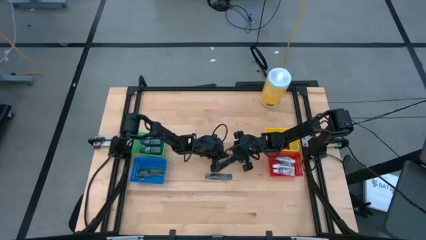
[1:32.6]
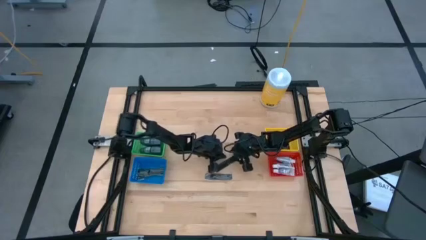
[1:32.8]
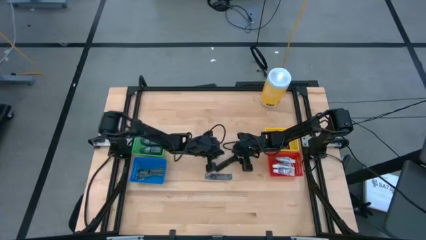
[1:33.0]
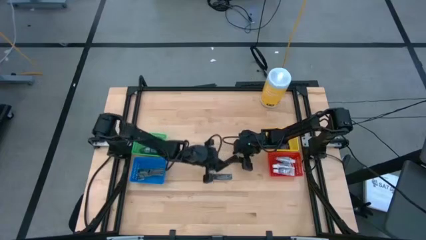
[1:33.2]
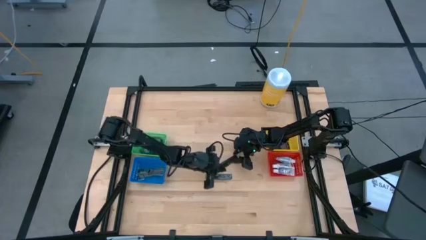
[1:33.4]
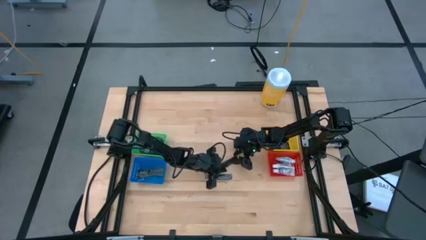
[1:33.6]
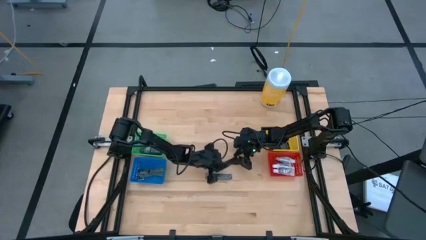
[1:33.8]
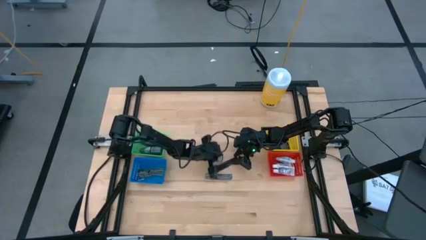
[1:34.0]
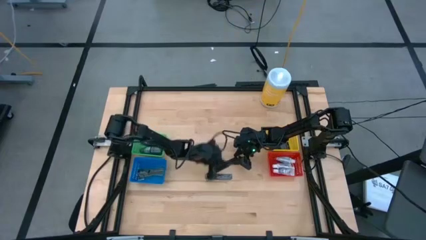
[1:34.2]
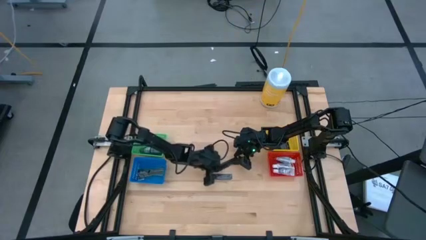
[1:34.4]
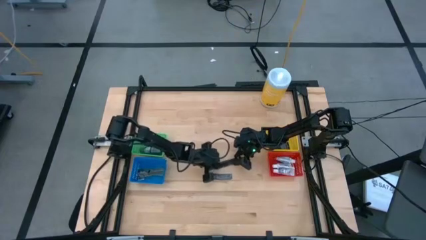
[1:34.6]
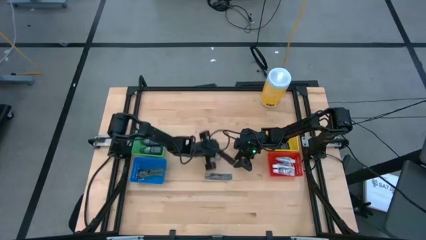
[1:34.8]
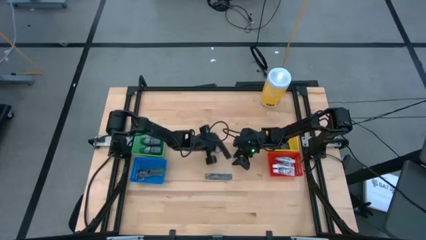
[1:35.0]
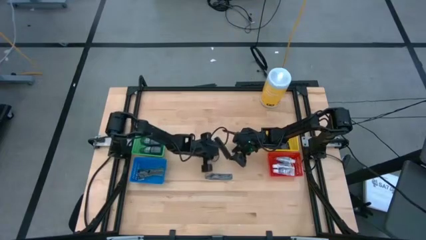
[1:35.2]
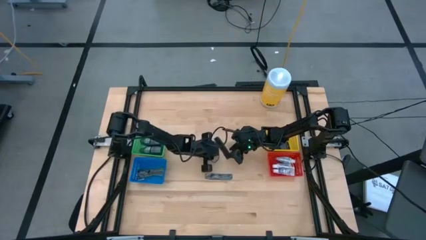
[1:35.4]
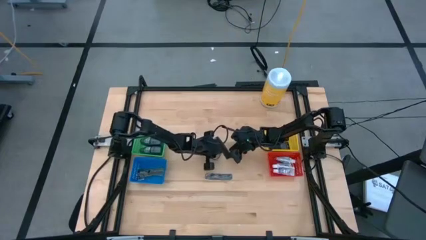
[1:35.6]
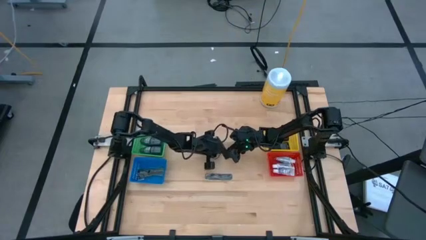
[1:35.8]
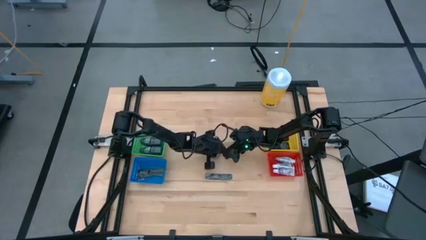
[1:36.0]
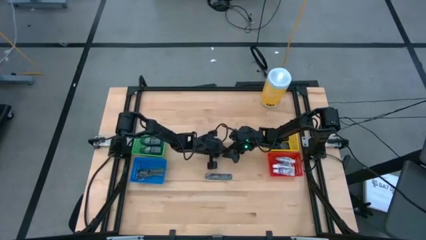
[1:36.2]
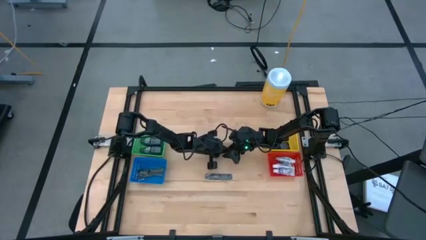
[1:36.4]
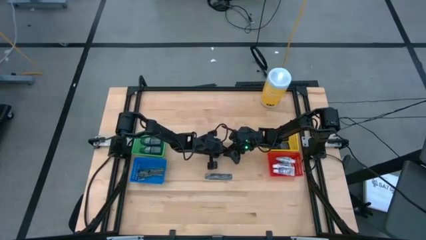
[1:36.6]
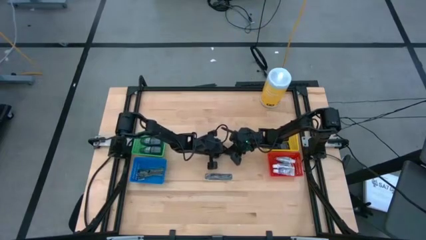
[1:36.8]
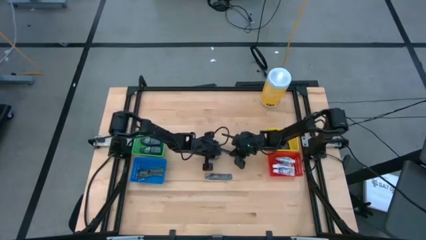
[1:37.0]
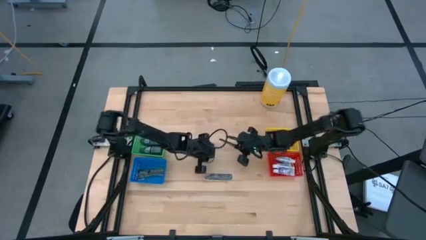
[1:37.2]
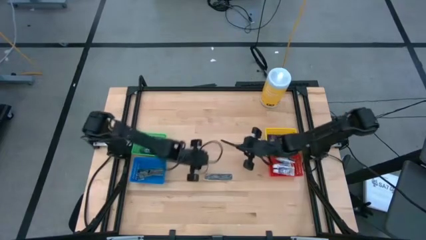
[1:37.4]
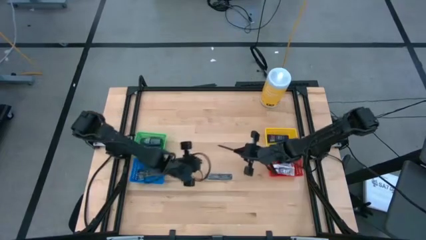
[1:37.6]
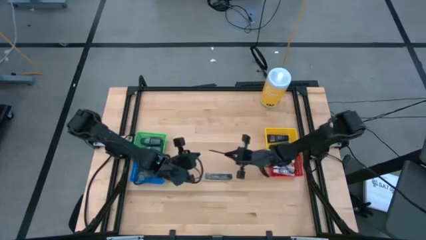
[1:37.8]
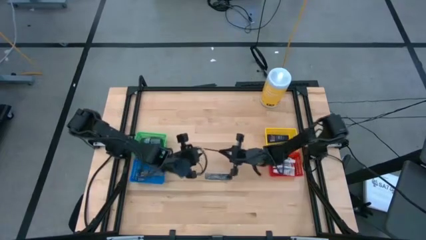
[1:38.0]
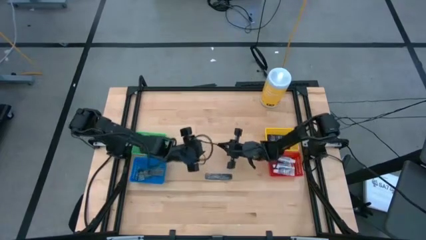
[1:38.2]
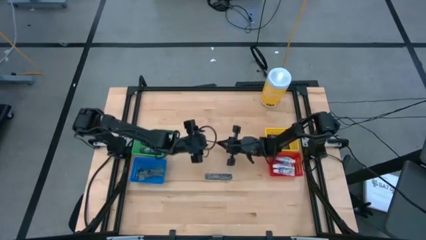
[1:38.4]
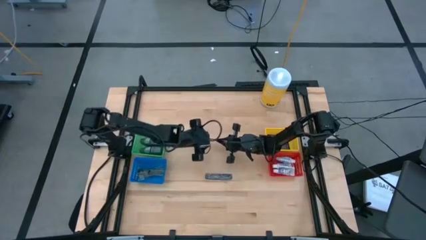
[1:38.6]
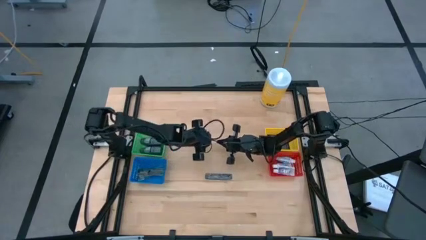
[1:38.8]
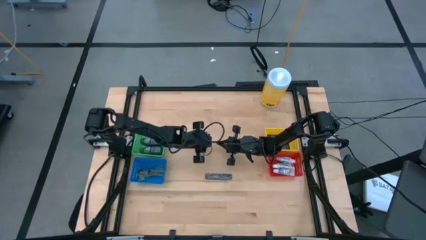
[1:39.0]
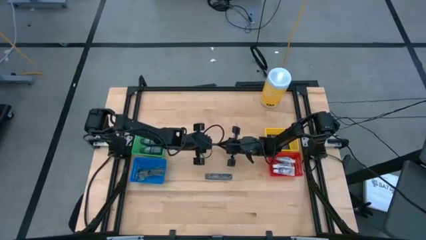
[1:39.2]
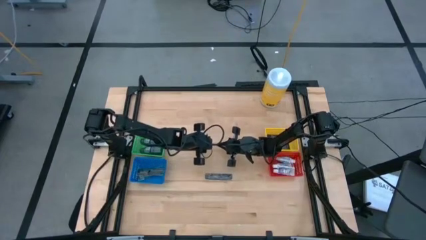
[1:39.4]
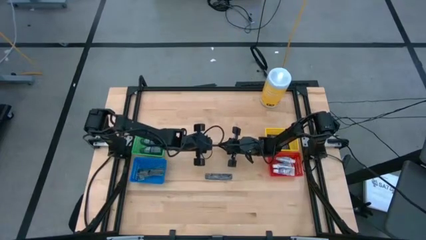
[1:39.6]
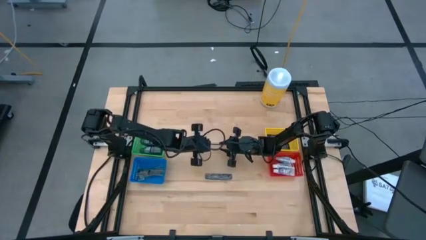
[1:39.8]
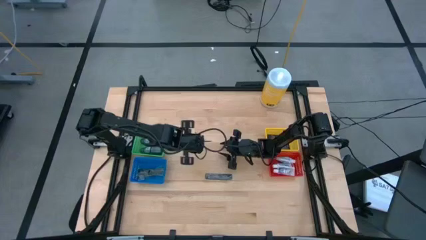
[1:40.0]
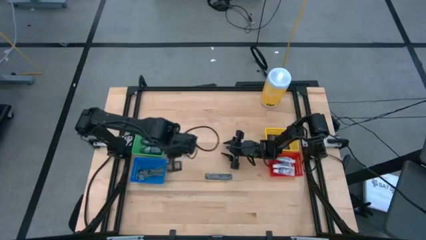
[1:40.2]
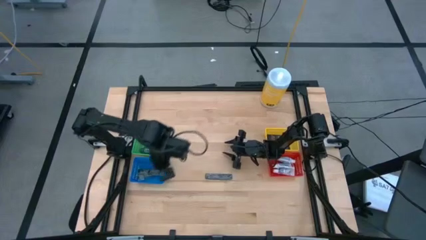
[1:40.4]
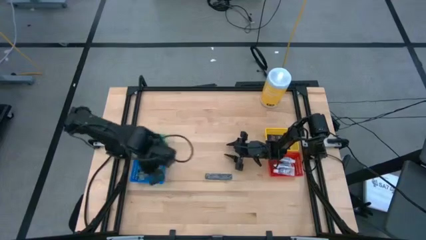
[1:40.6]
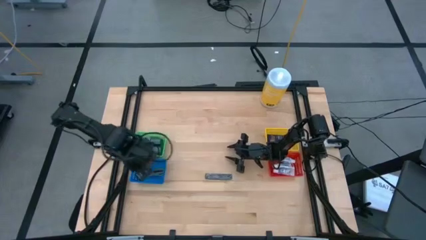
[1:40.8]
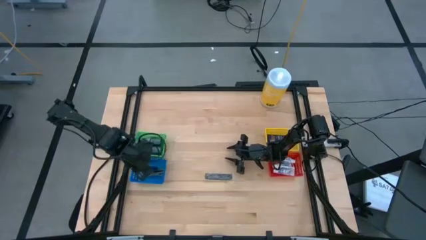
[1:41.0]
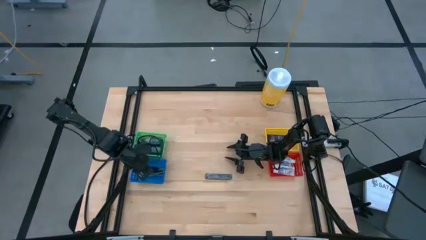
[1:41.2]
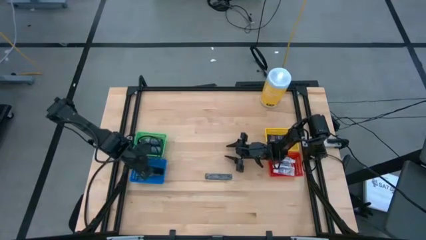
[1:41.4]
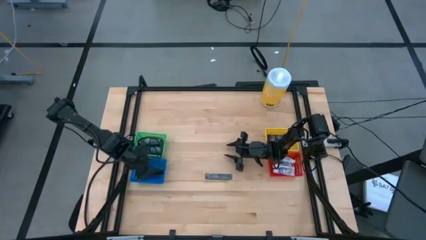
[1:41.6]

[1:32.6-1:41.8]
Task: Pick & Place Travel size toiletries
Put the black comb into the blue bin

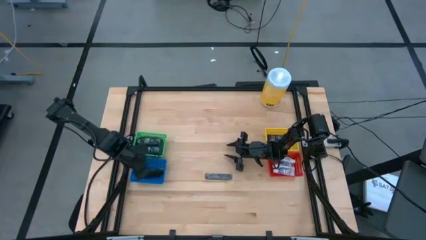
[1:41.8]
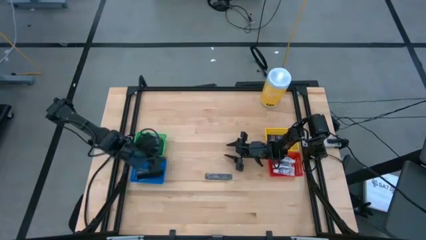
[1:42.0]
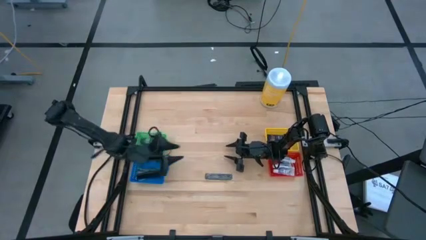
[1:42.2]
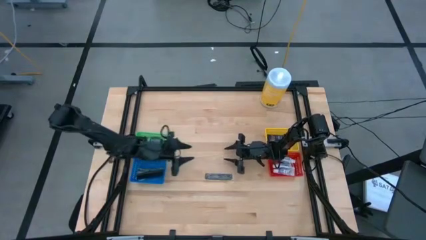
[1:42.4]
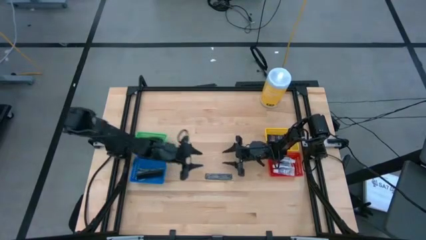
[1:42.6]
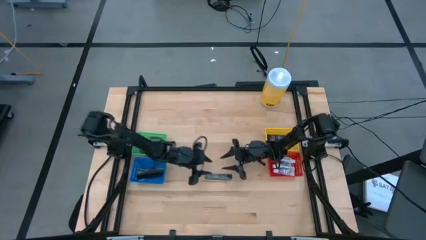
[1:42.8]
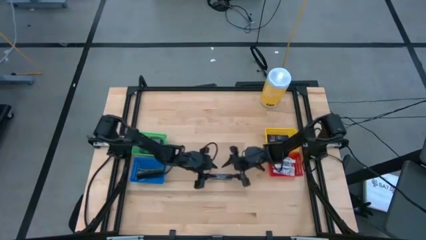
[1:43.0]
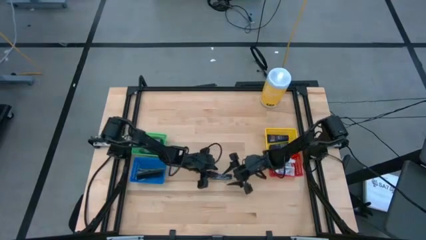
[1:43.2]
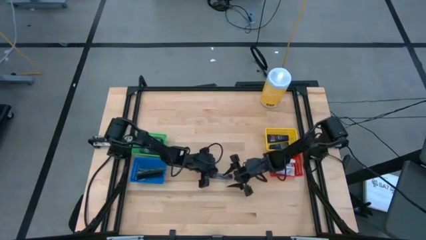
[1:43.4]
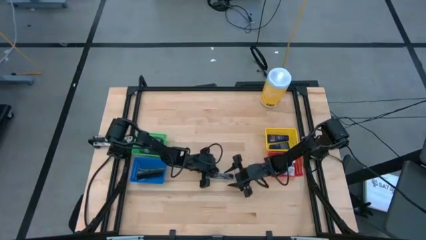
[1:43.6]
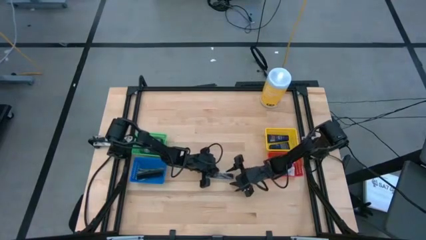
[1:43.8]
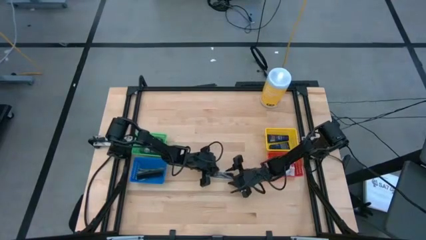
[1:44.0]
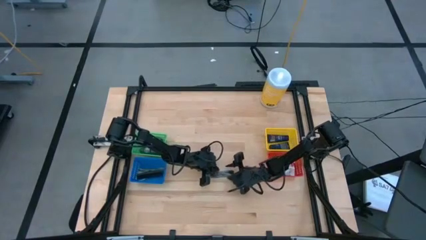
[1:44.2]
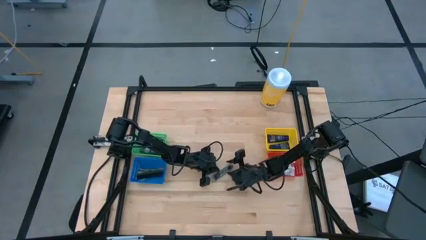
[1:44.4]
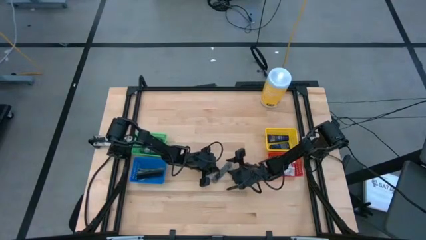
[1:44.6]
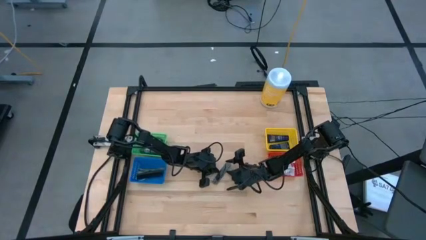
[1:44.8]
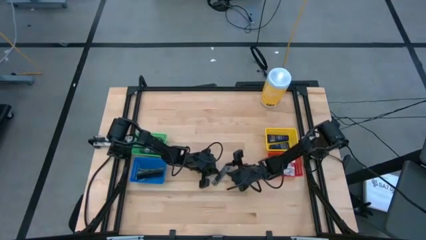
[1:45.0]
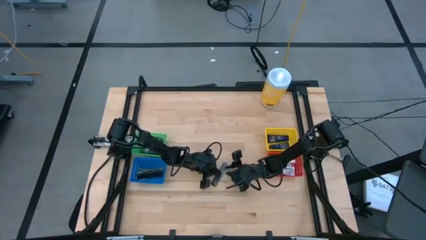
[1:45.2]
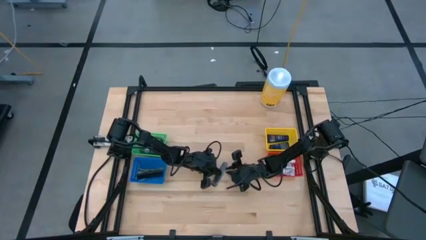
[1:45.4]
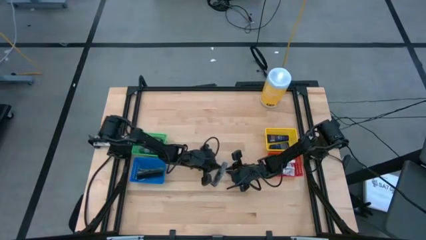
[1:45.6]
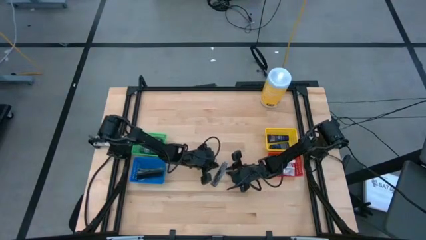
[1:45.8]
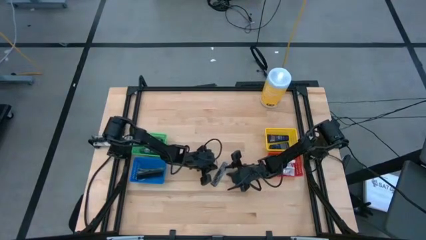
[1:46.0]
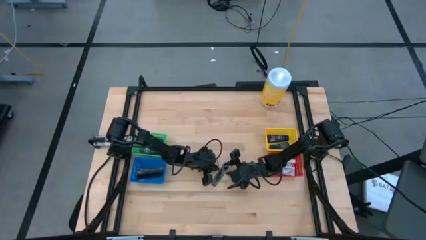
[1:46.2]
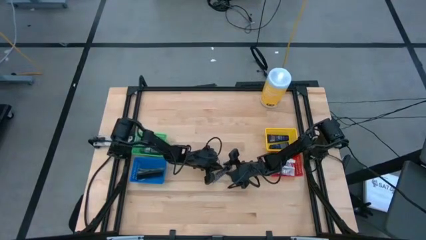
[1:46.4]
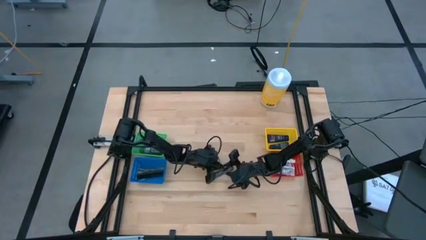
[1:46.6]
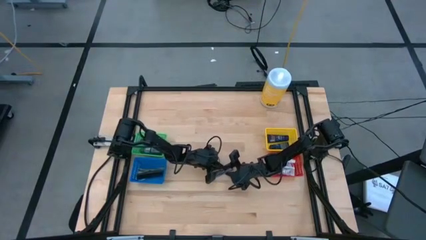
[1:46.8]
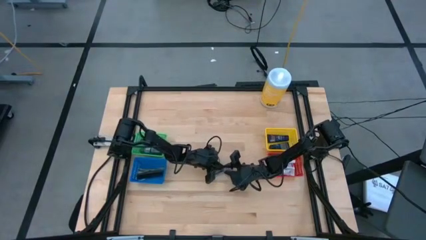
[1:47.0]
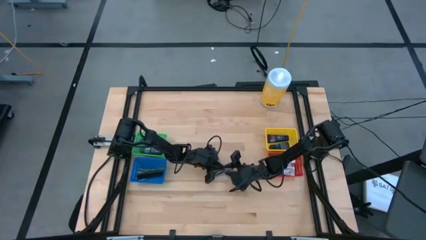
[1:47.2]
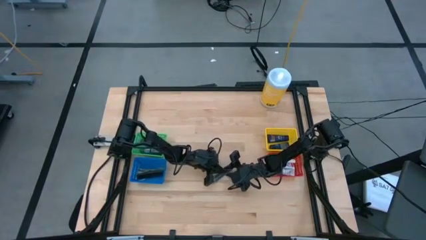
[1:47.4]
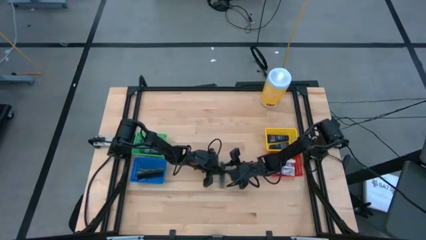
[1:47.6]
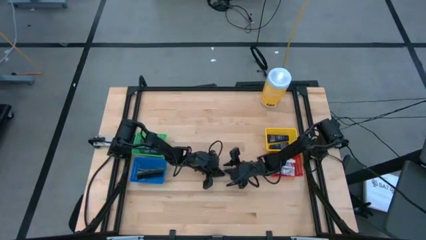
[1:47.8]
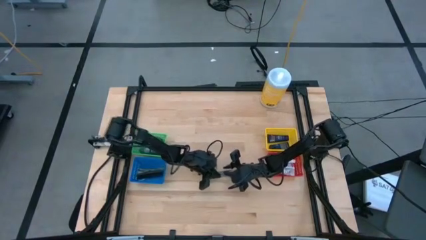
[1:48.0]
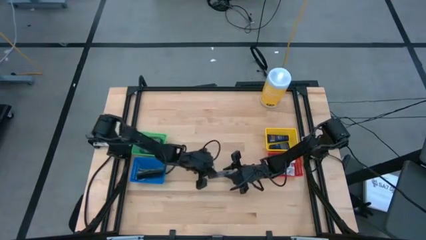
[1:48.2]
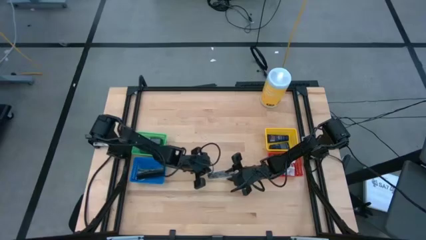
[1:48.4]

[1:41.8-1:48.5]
Put the black comb into the blue bin
